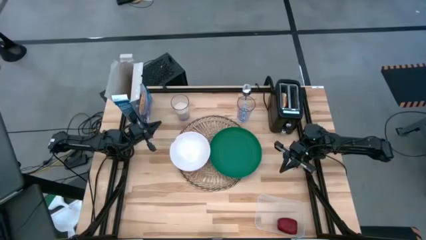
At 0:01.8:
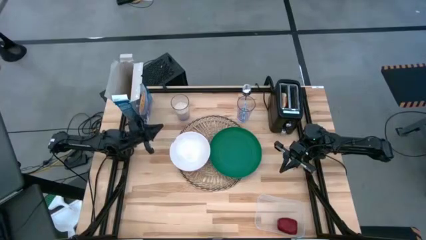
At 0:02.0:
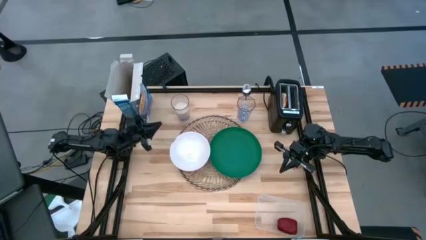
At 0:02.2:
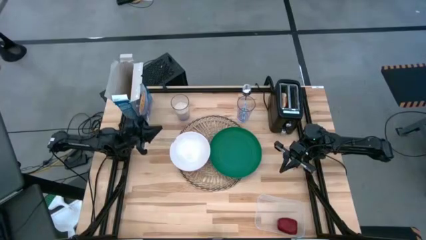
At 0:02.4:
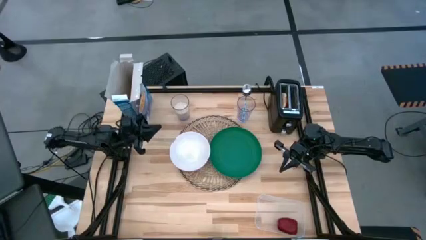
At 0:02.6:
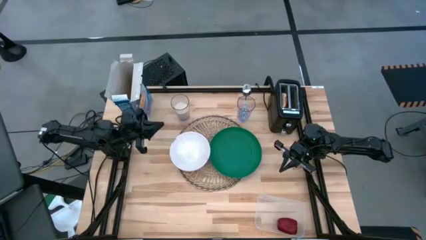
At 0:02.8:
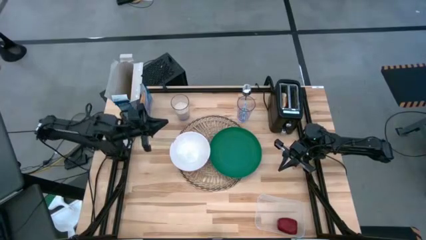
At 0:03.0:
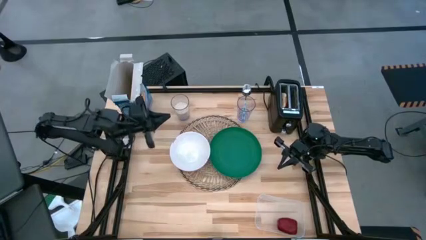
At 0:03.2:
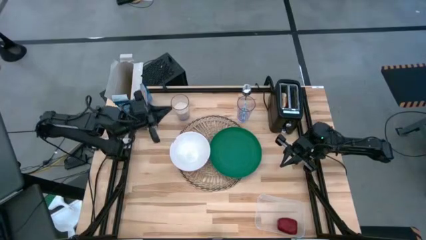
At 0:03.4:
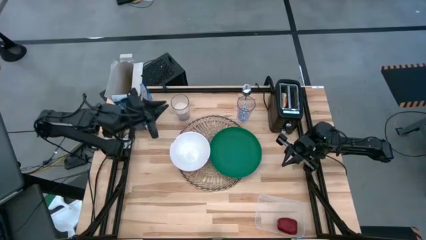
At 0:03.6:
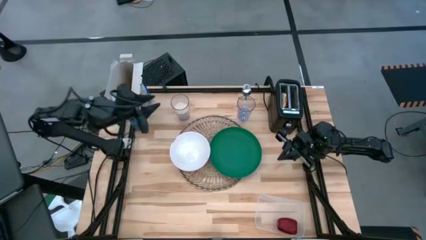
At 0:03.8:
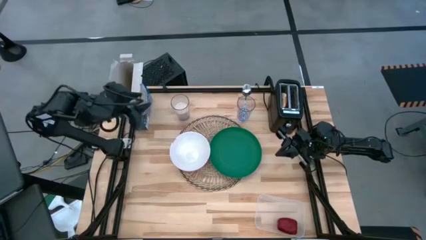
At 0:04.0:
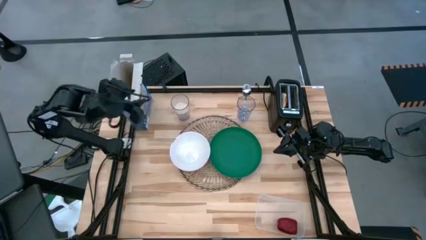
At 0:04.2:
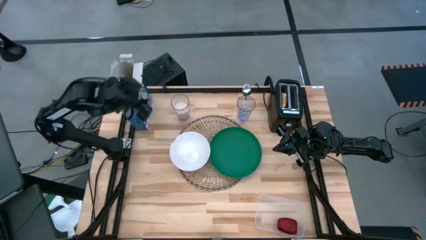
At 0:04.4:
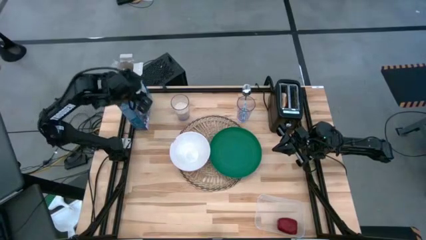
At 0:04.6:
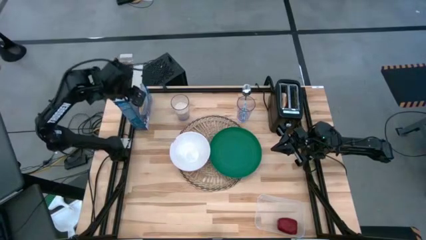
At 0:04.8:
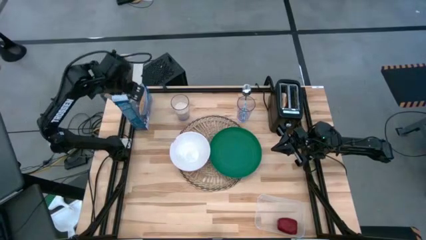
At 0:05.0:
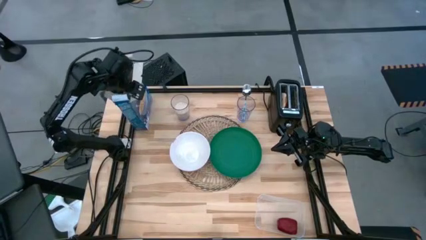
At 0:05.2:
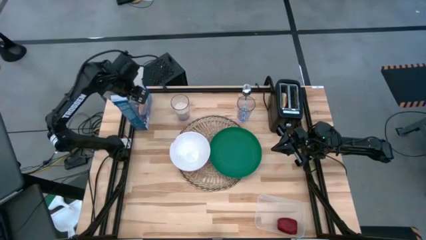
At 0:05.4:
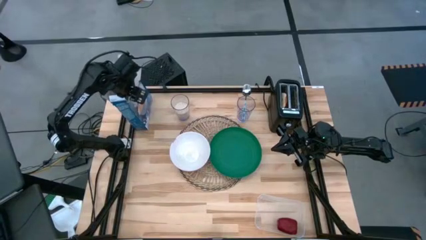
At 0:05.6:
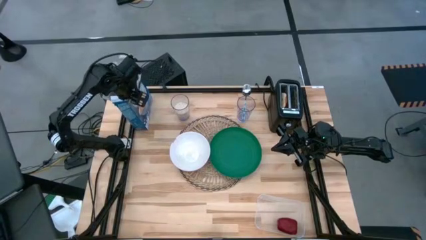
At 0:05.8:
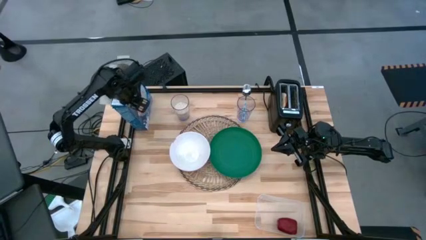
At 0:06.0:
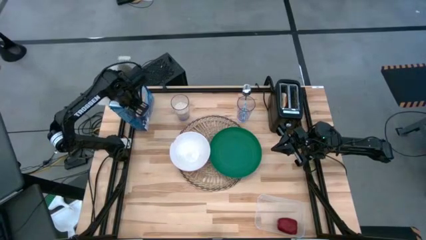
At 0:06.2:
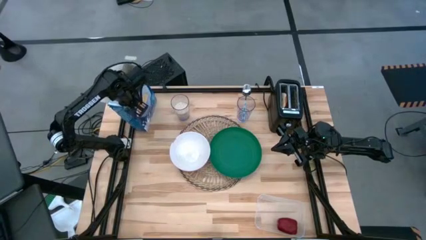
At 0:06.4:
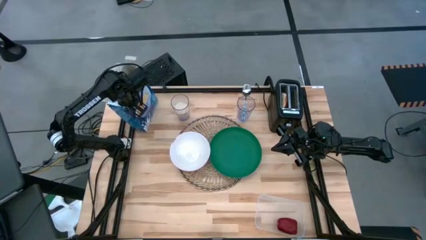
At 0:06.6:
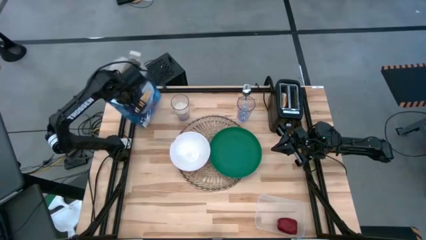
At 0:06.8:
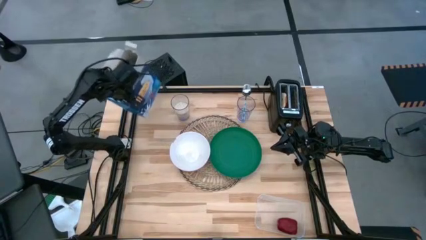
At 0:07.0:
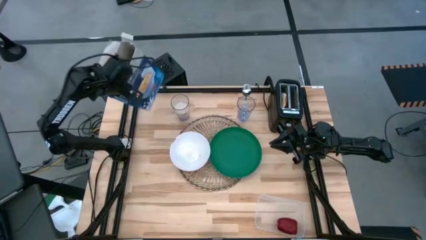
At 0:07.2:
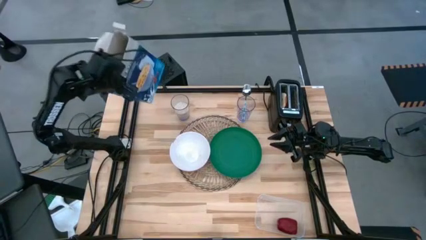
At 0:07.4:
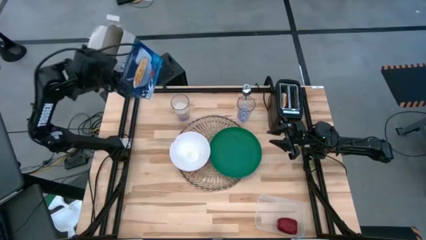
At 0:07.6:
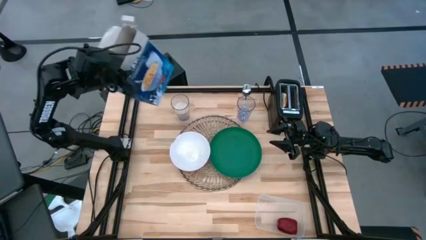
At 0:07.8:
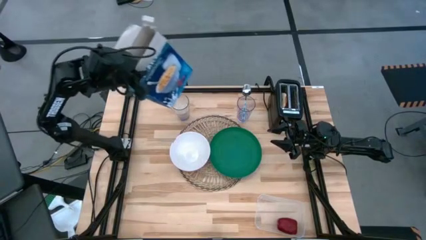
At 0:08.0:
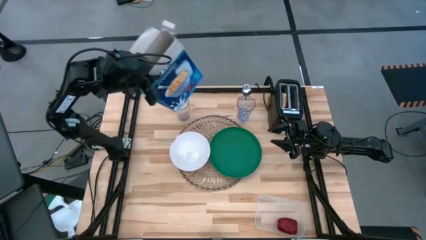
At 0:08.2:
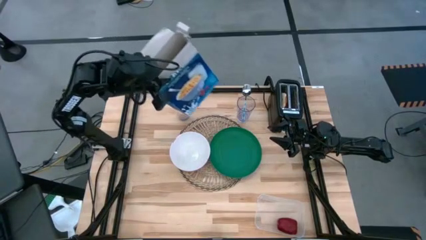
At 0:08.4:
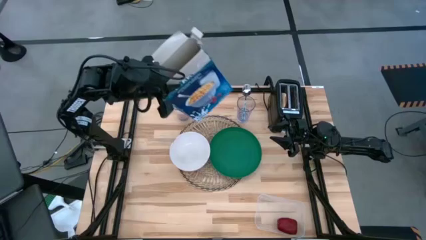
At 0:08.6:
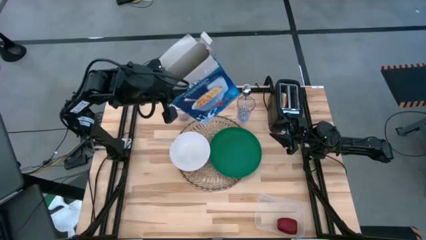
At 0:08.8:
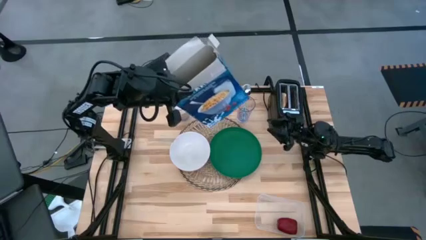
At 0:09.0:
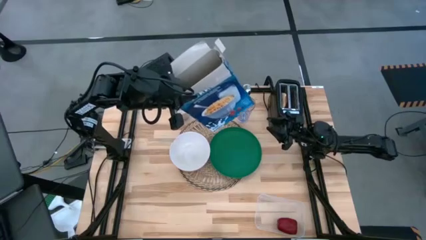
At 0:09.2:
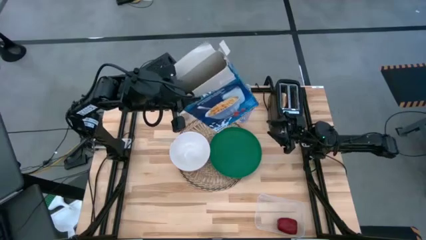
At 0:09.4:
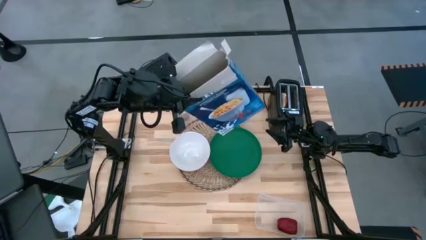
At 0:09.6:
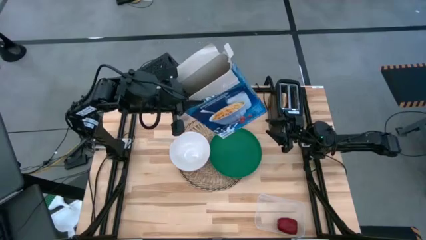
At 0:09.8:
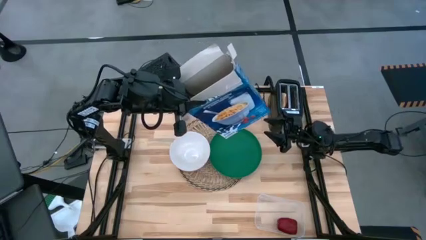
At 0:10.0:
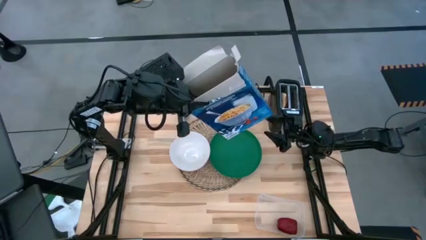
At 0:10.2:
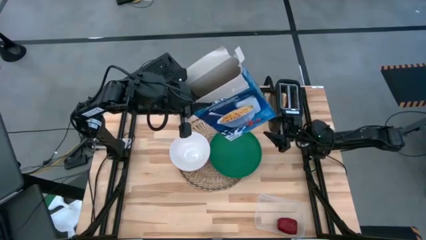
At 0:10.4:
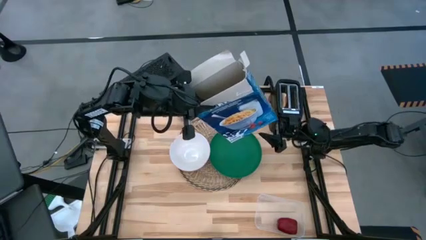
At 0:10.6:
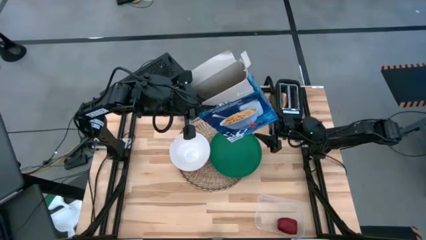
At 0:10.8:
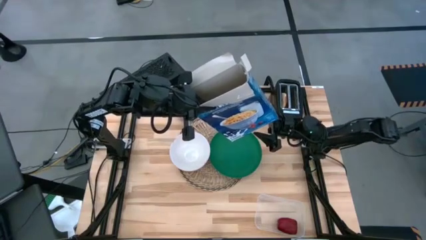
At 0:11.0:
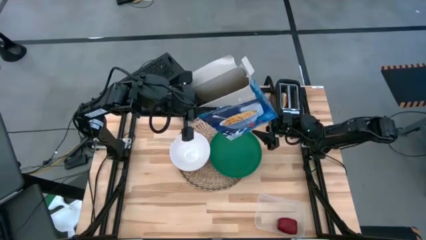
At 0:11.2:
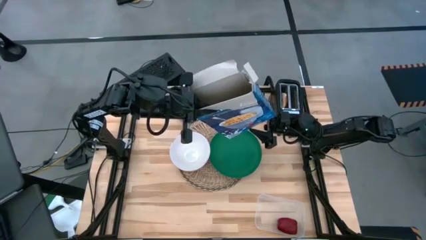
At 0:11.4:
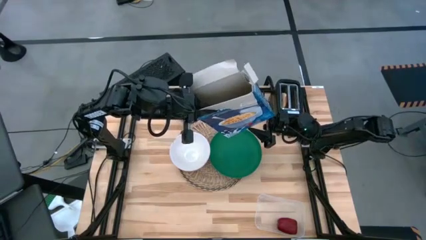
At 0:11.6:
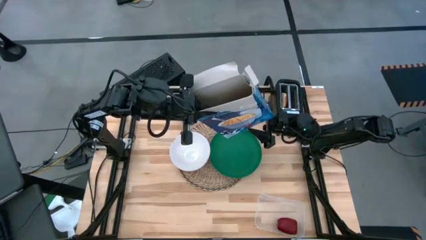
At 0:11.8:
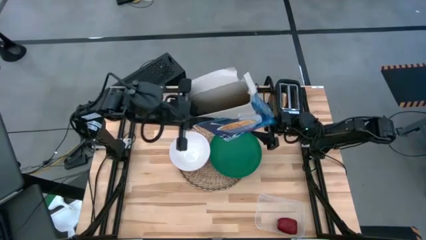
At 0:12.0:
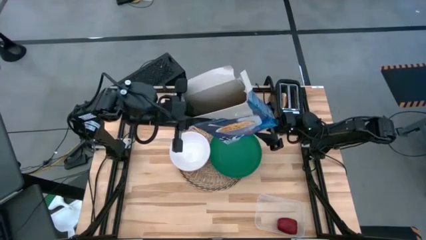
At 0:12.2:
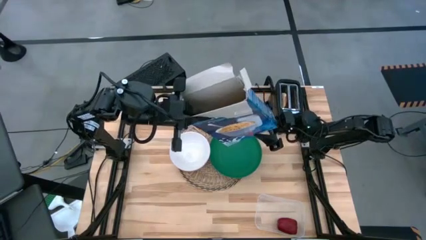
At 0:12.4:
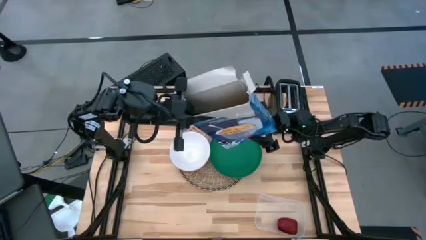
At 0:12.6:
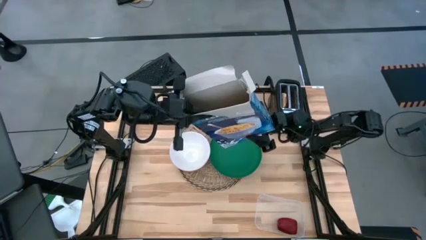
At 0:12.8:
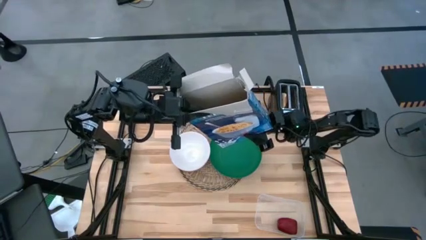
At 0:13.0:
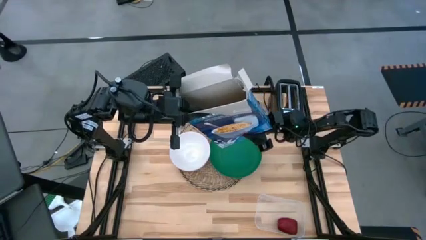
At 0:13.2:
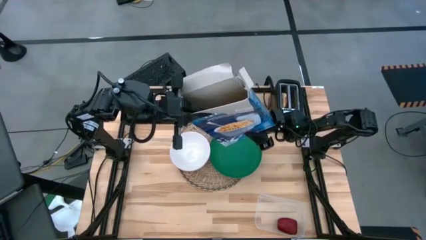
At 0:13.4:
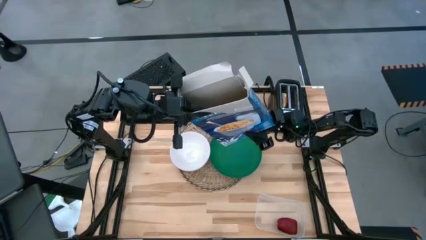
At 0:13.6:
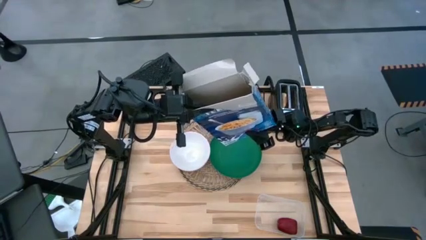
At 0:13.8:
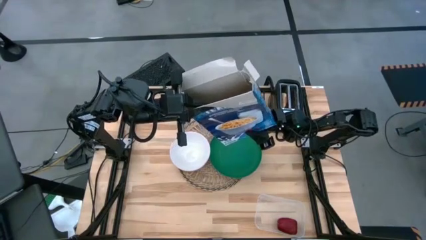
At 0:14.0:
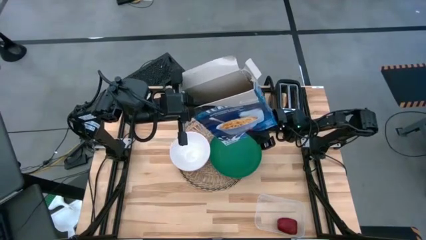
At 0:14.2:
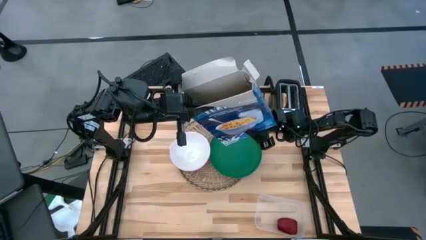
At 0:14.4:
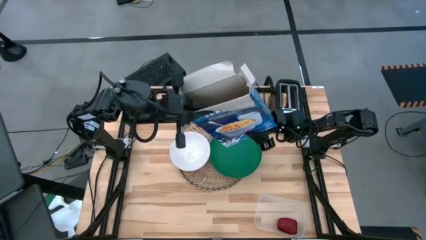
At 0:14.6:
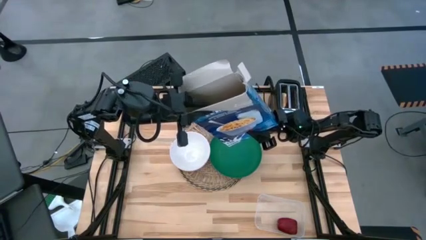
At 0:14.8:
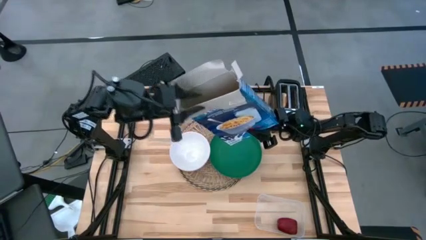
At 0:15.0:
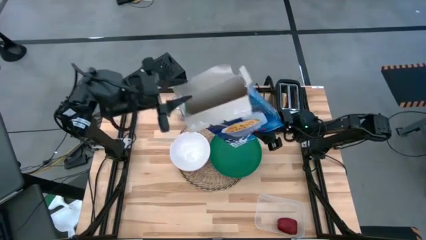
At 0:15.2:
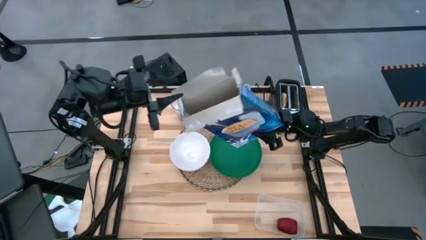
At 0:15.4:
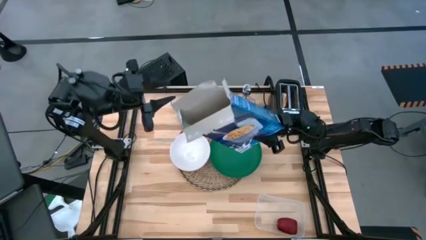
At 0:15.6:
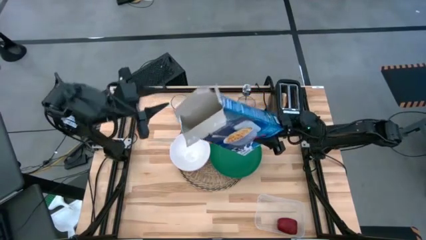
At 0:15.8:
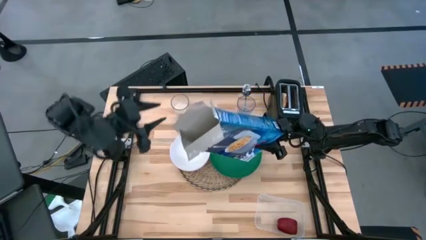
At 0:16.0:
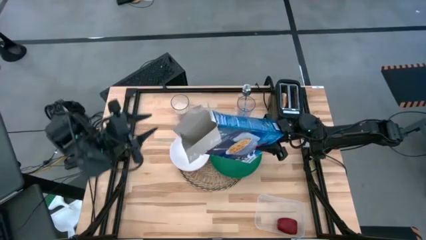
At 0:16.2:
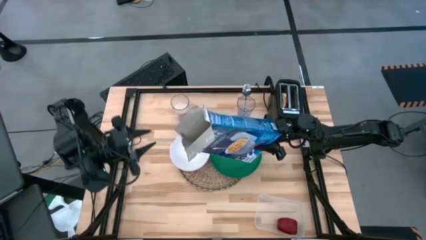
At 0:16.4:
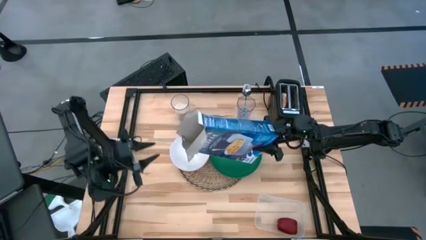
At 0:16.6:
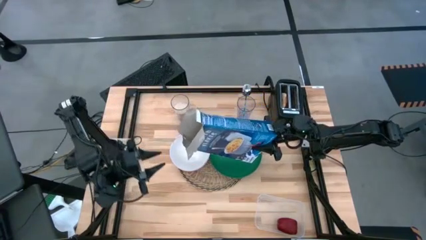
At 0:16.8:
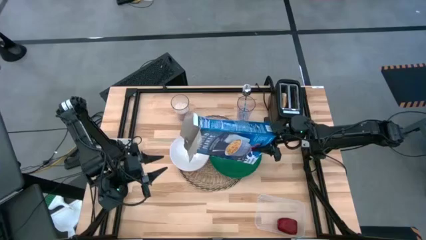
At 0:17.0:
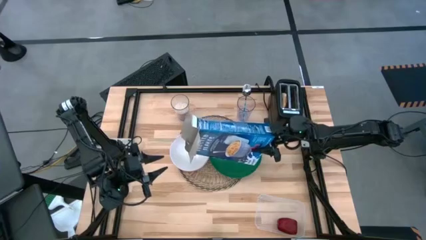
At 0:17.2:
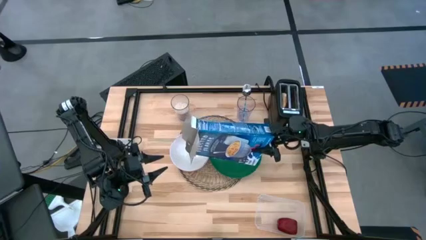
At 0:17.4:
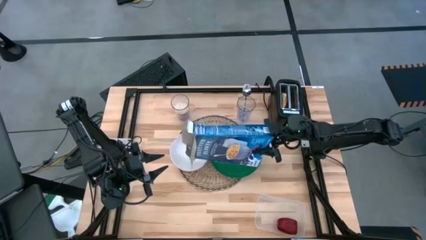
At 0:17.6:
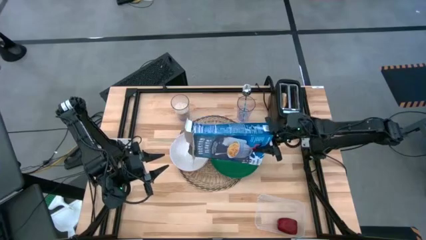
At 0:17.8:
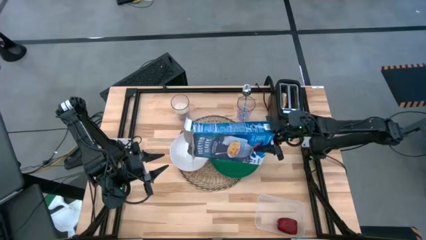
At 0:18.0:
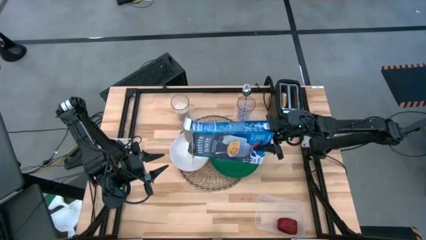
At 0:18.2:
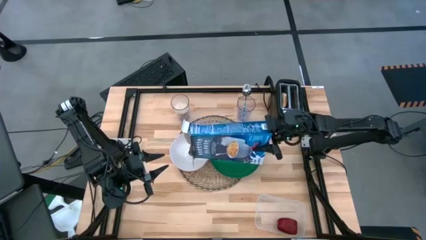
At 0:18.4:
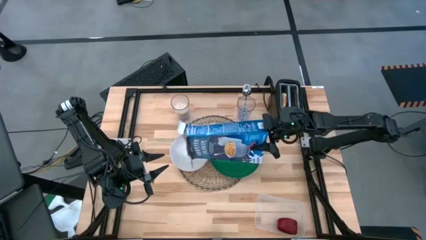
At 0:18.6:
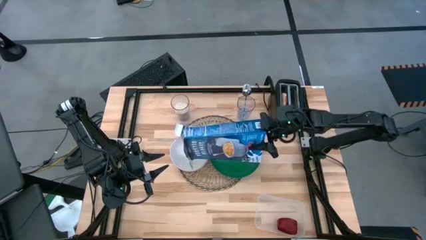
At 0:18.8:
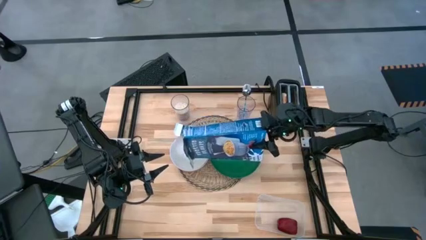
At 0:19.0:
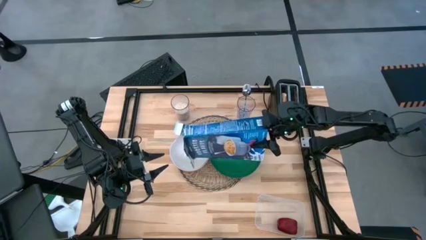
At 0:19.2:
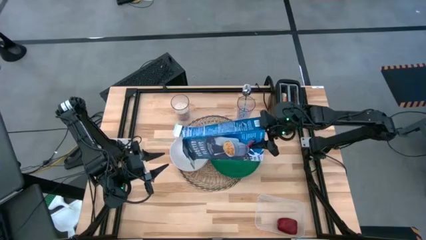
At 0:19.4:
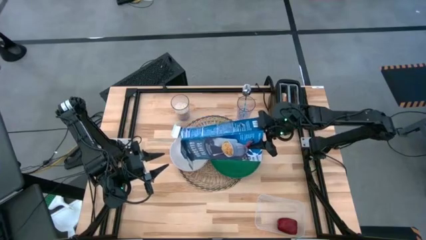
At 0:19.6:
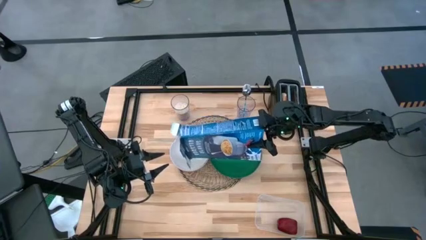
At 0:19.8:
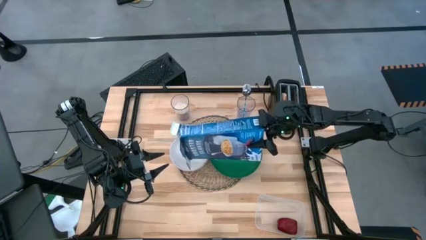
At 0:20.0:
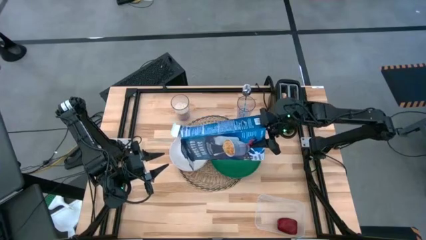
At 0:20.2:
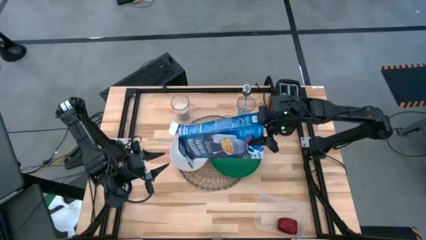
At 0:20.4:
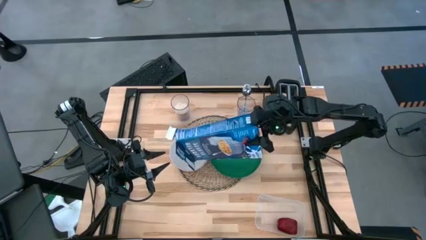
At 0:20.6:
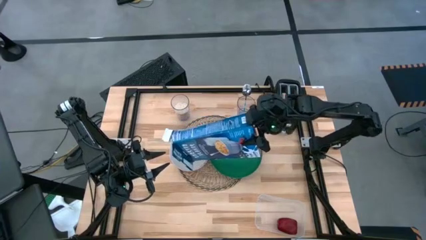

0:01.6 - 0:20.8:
Task: Arrange a breakfast setting
Pour the cereal into the white bowl
